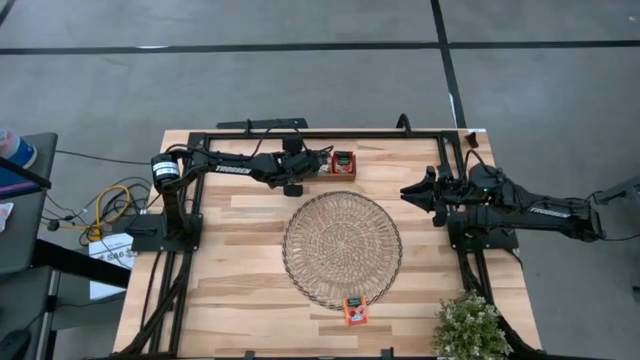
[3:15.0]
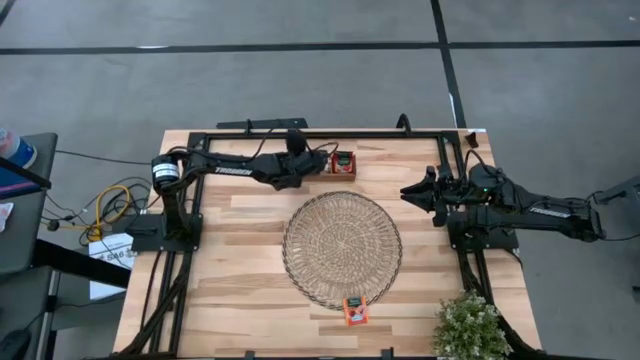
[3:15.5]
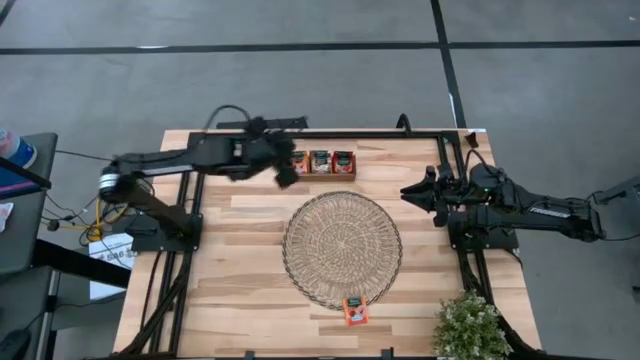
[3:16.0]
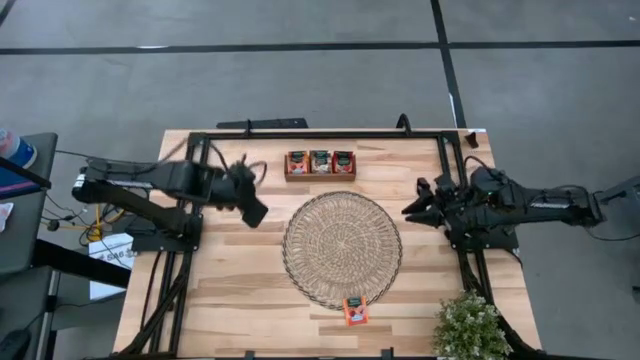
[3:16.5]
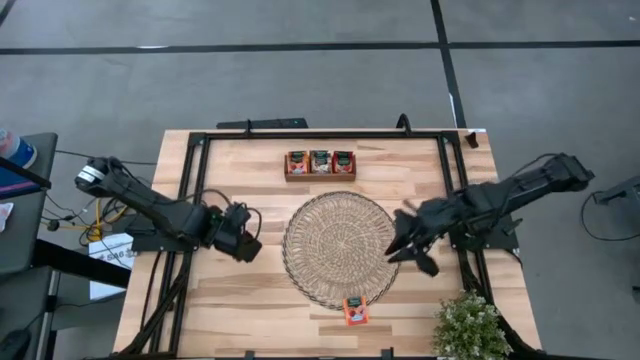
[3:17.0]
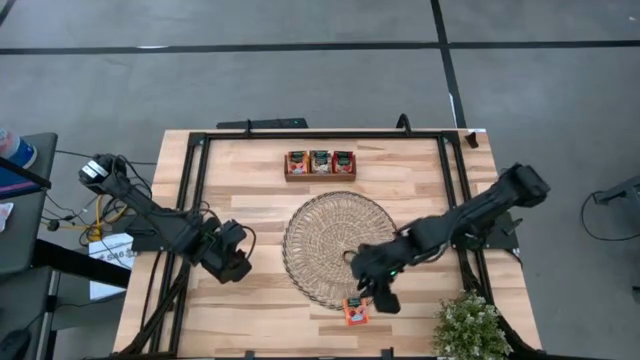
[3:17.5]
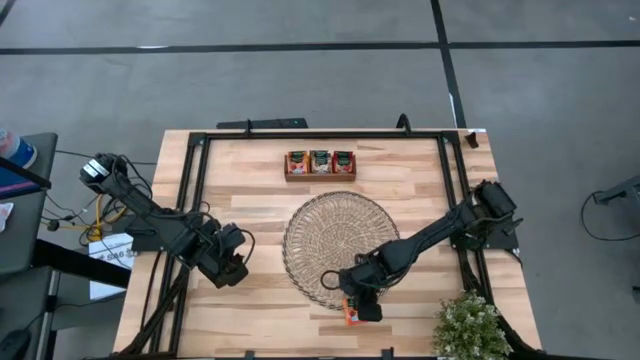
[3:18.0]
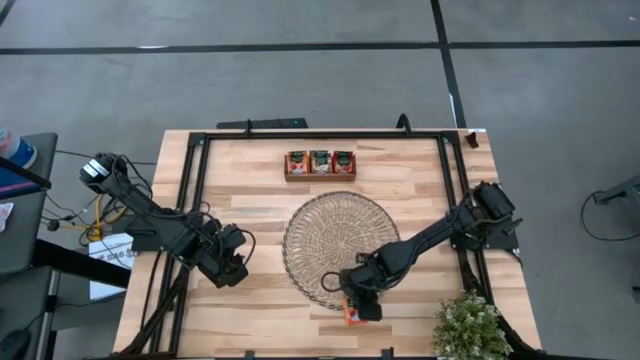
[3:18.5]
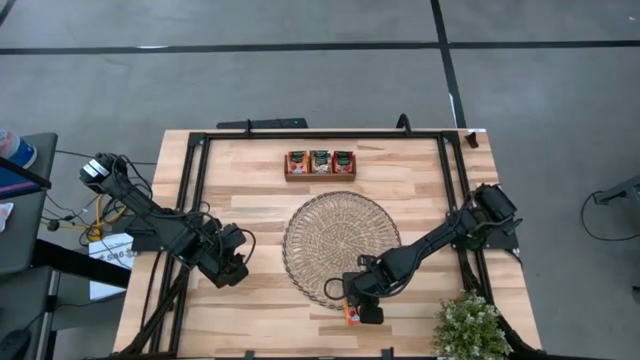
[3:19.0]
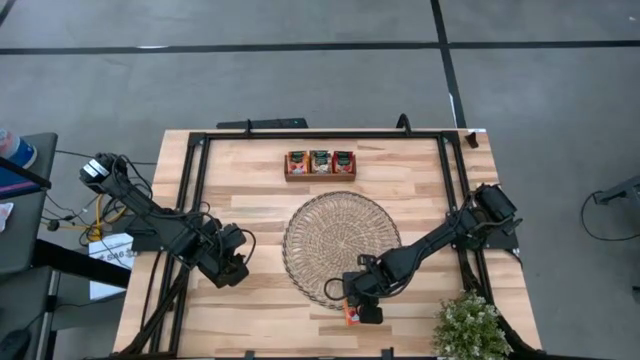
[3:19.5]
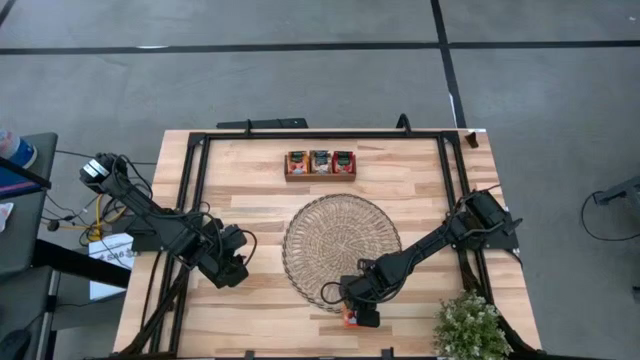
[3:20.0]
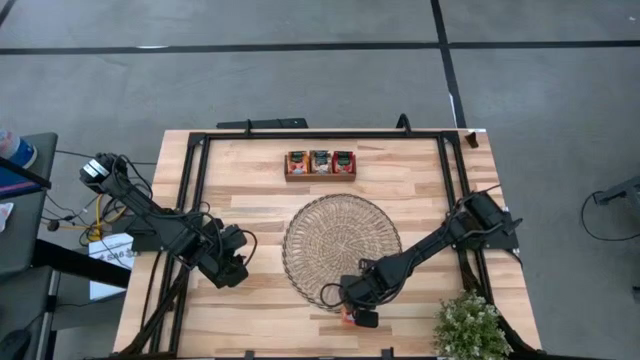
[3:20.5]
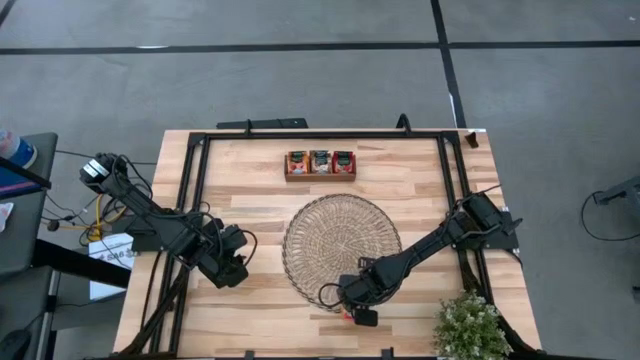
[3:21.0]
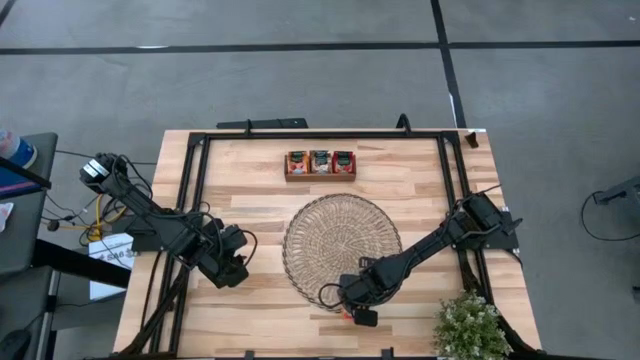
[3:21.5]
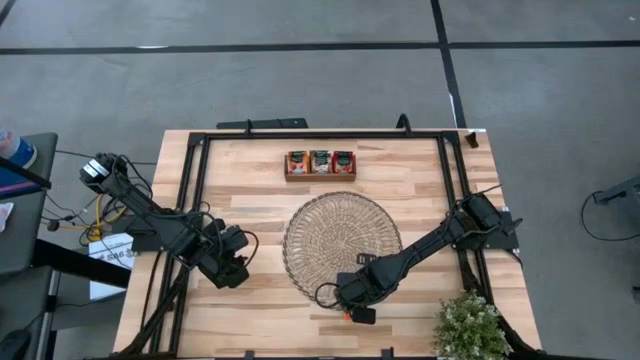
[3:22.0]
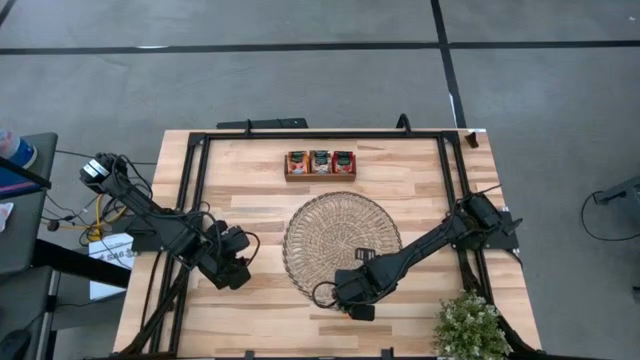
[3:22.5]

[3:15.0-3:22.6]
Task: Pick & Place Tea
Put the orange tea bag into the left section of the brown wooden organizer

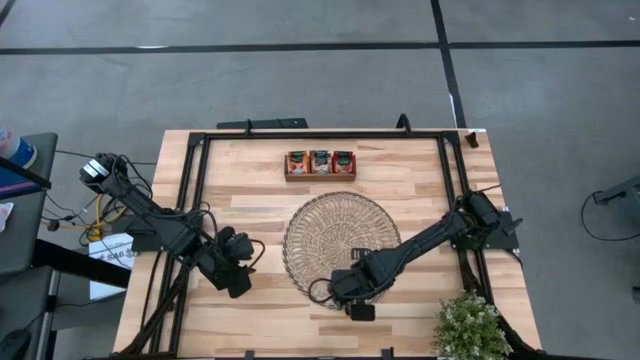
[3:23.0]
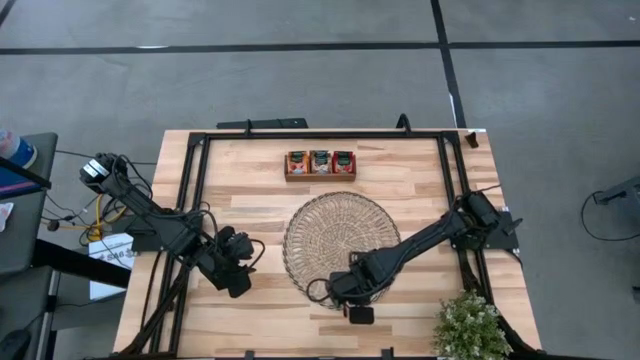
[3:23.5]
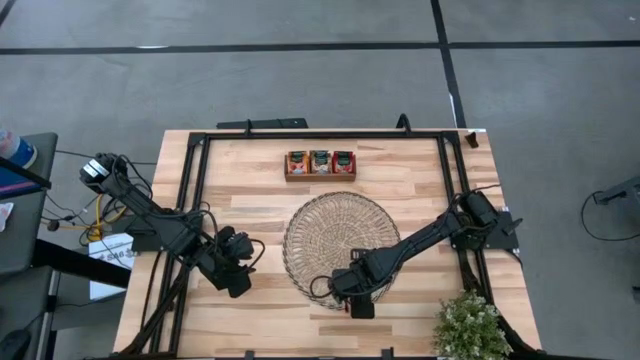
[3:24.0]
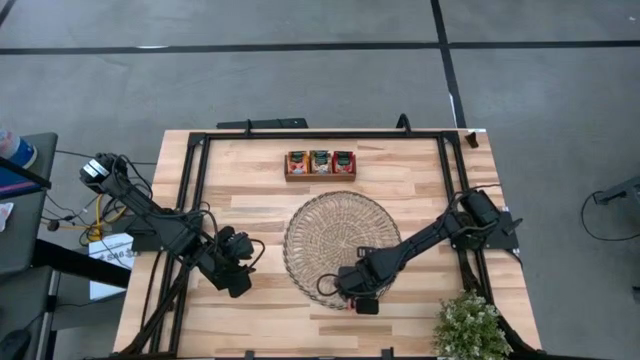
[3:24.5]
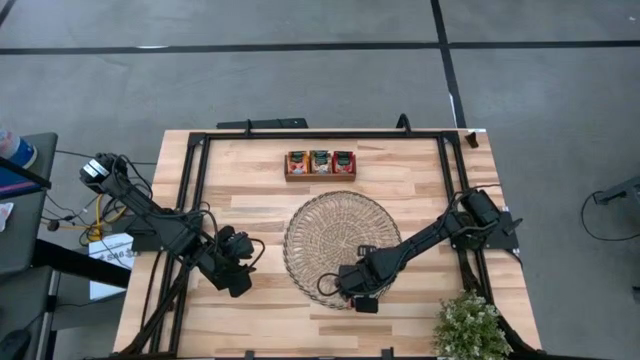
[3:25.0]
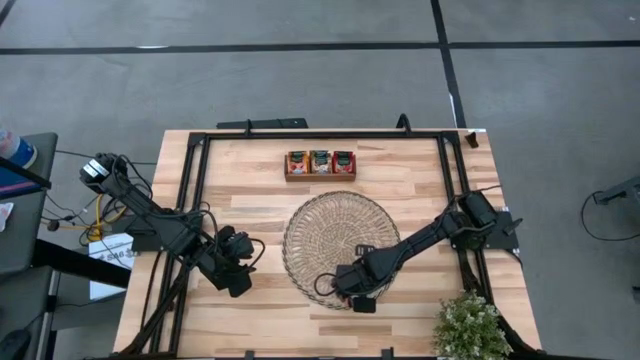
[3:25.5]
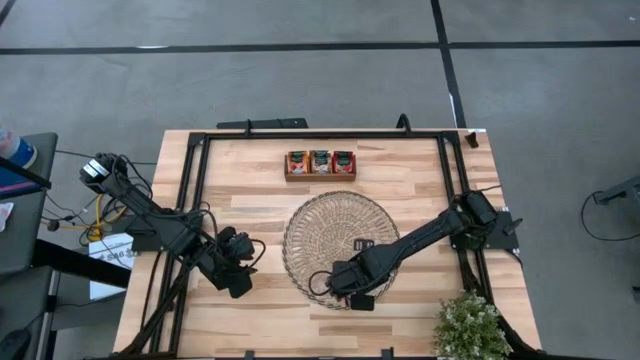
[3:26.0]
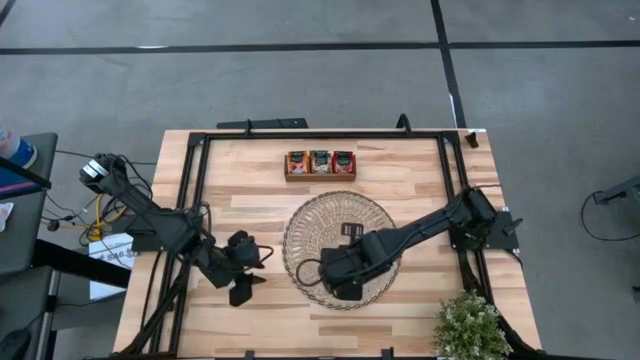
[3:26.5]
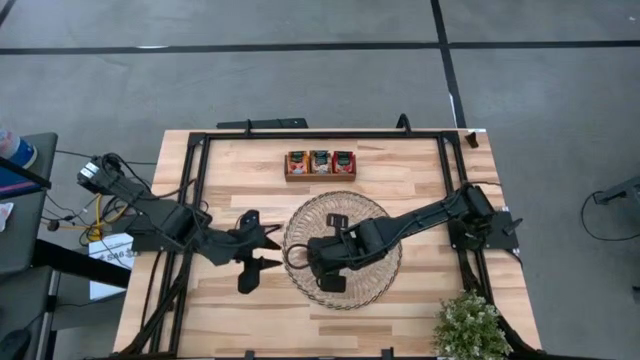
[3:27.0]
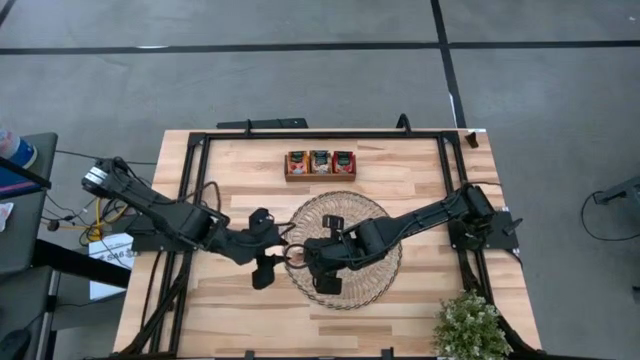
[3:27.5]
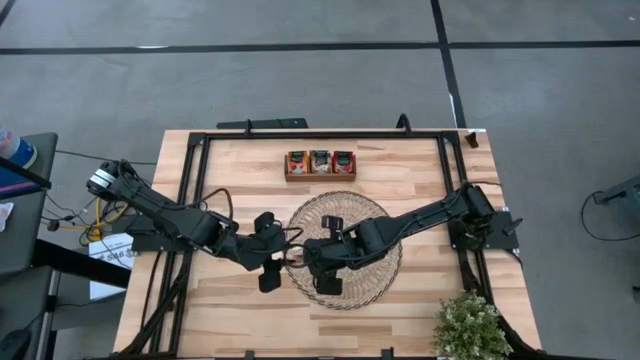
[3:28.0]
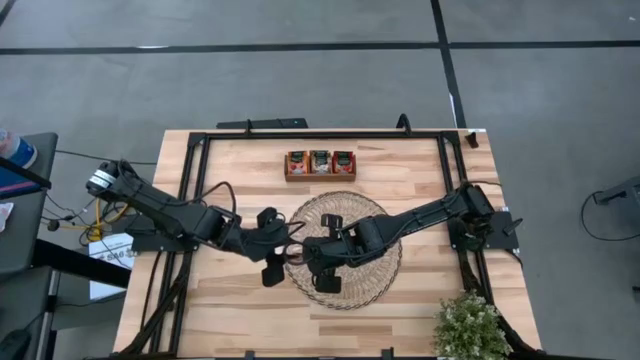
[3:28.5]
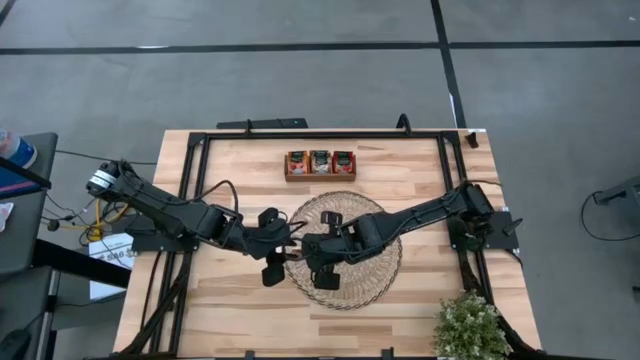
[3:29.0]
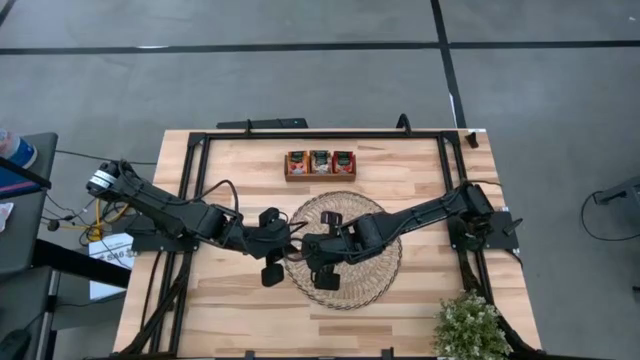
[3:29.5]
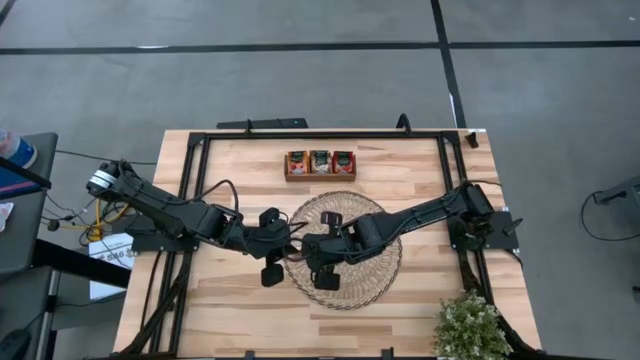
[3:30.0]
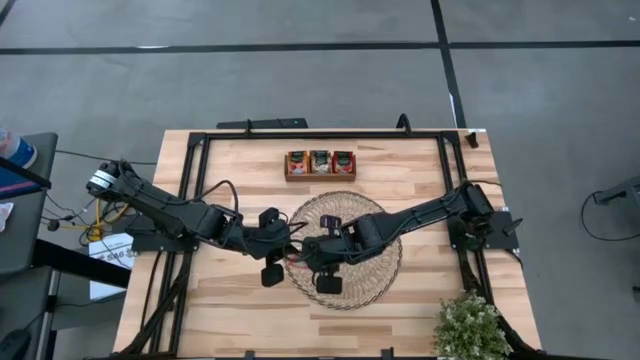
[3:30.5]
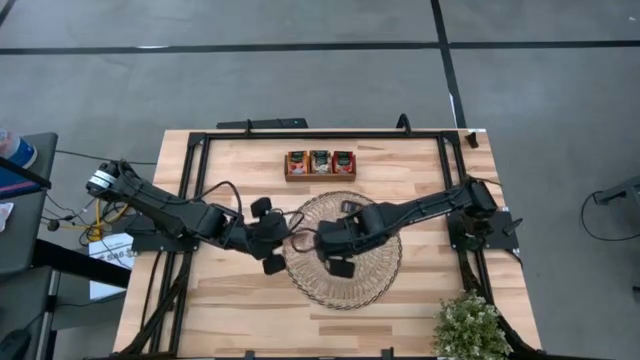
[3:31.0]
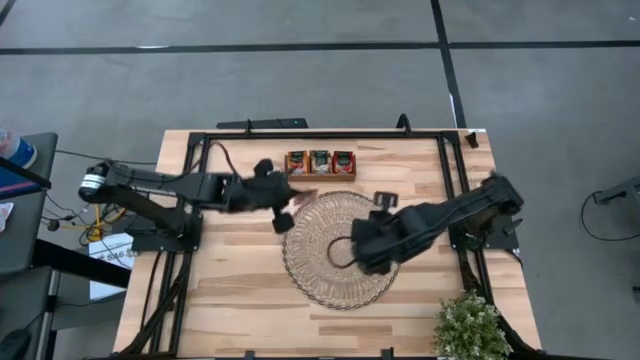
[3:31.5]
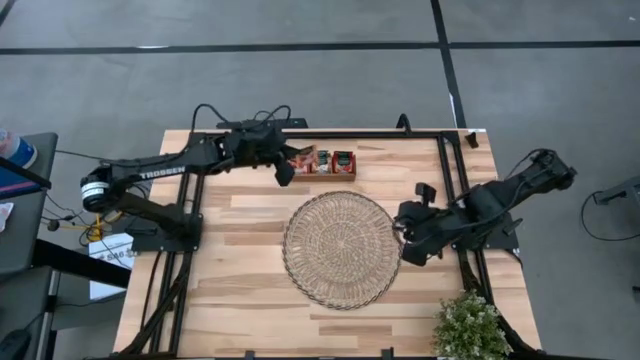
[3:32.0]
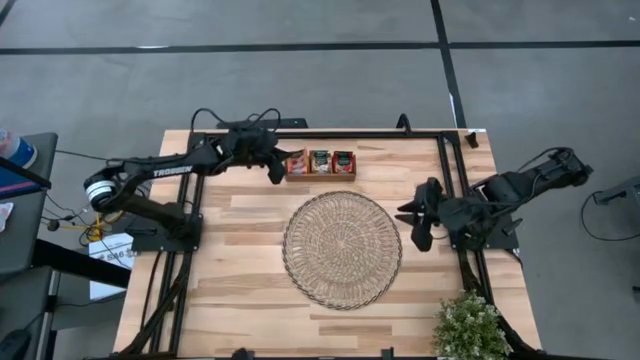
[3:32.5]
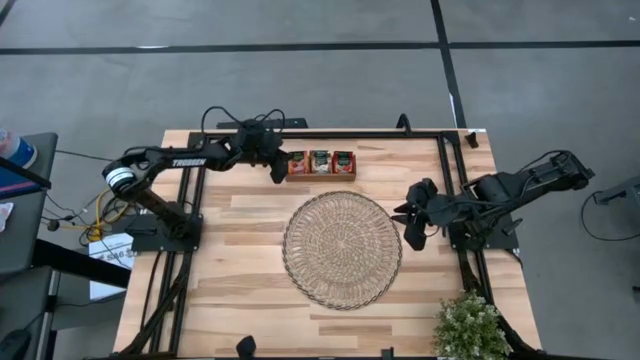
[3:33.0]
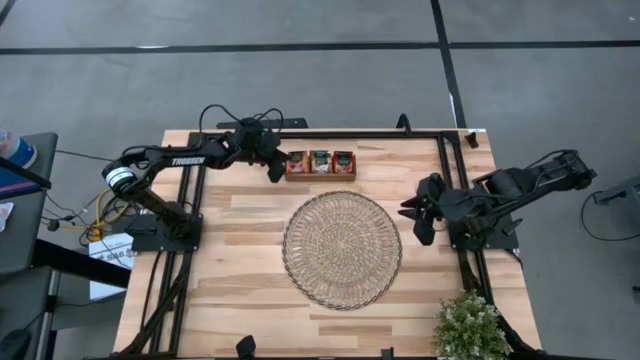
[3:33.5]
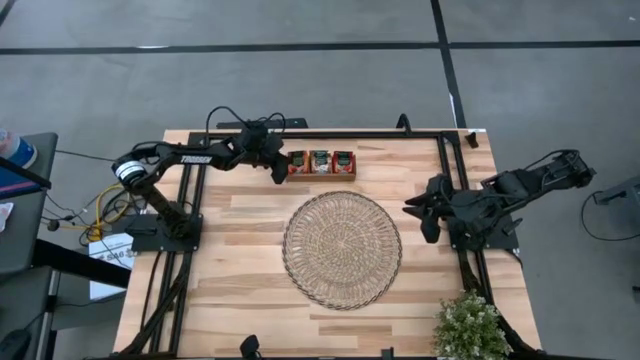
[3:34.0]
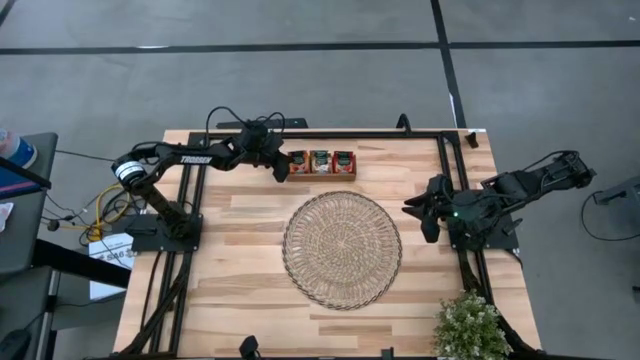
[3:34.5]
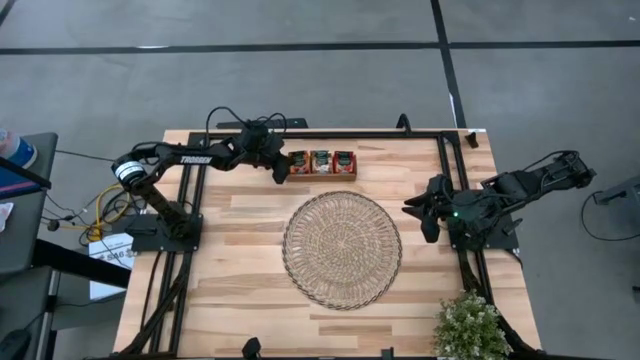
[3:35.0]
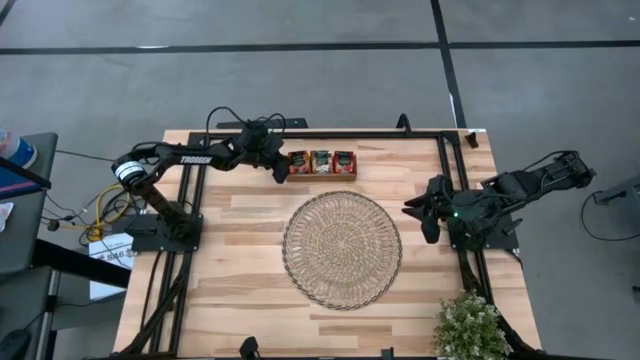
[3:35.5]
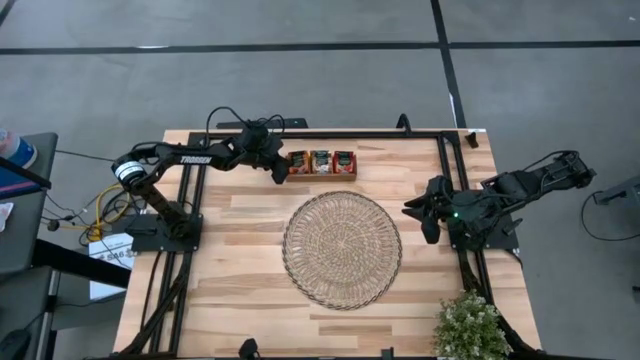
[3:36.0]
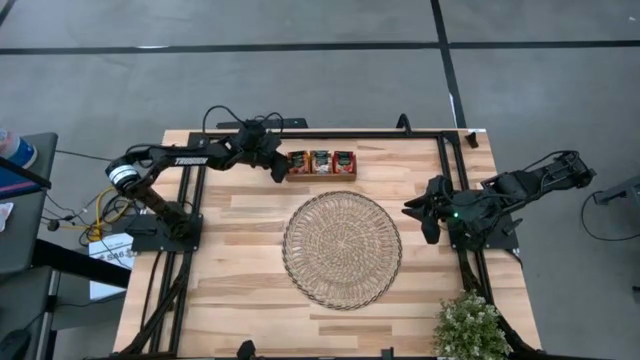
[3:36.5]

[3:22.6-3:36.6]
Put the orange tea bag into the left section of the brown wooden organizer
